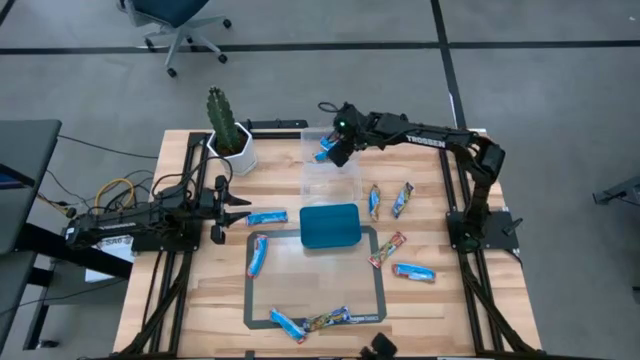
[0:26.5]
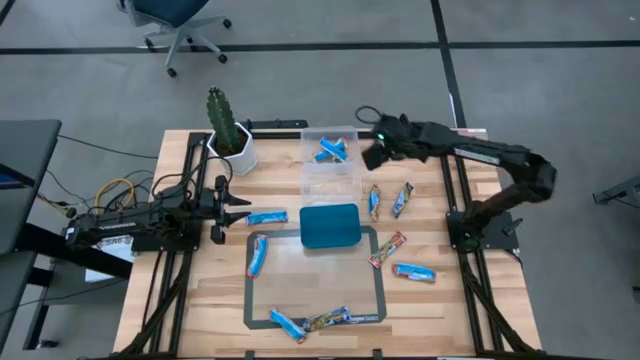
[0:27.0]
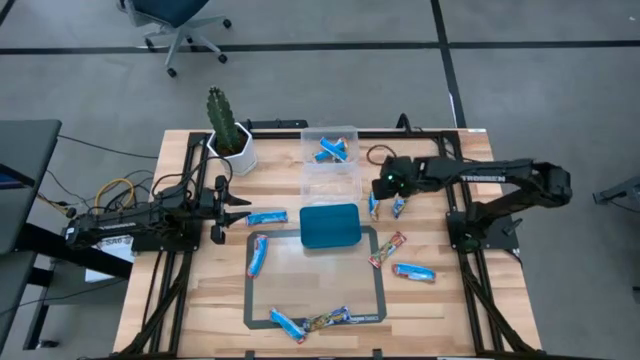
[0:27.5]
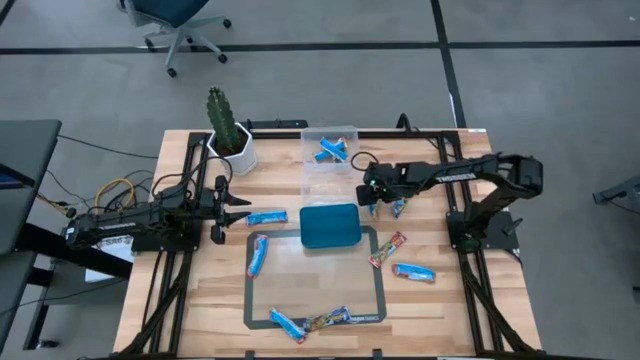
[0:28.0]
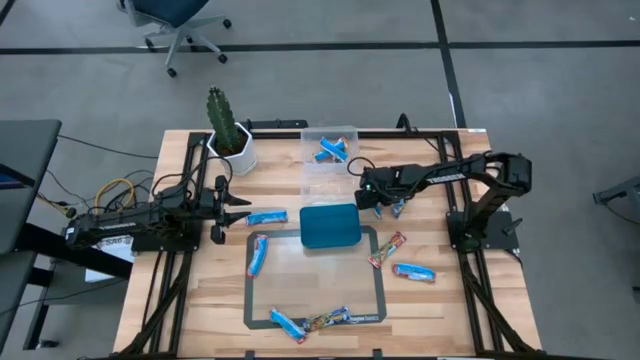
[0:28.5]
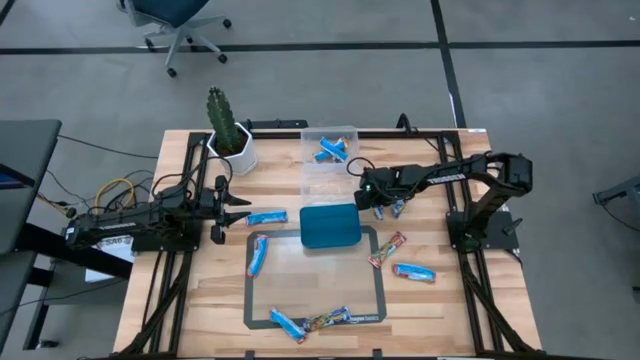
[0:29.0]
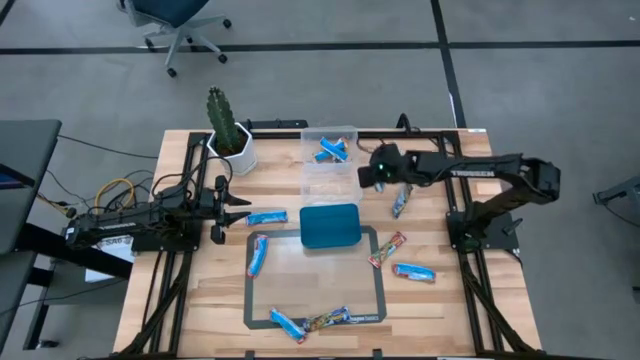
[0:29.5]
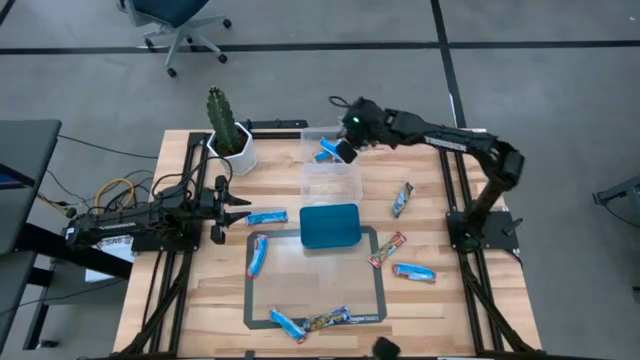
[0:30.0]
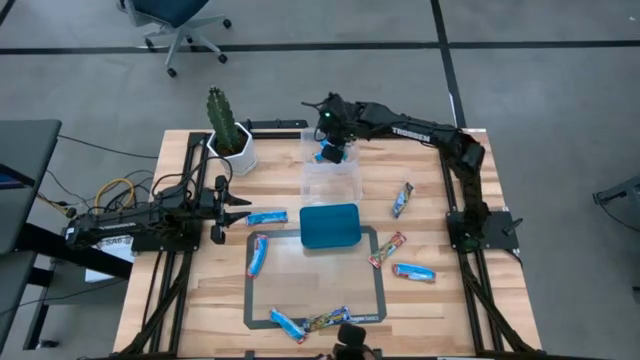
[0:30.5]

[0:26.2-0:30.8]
Task: Pick and place Granola Bars by type
Put the yellow granola bar into the top transparent bin

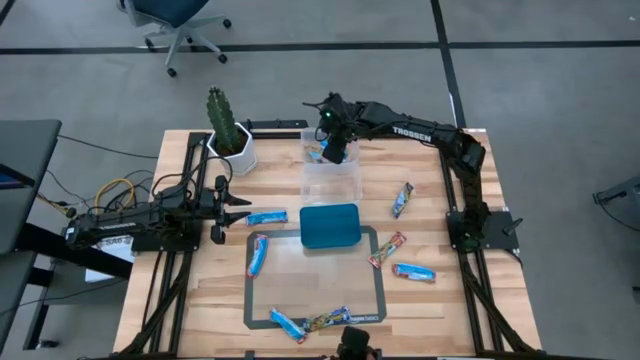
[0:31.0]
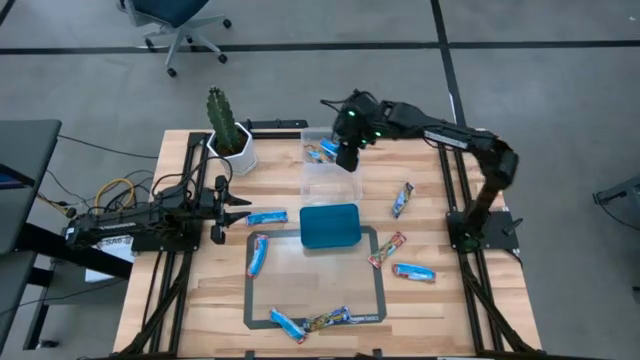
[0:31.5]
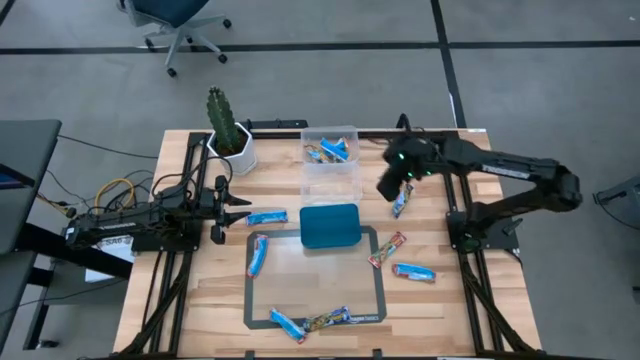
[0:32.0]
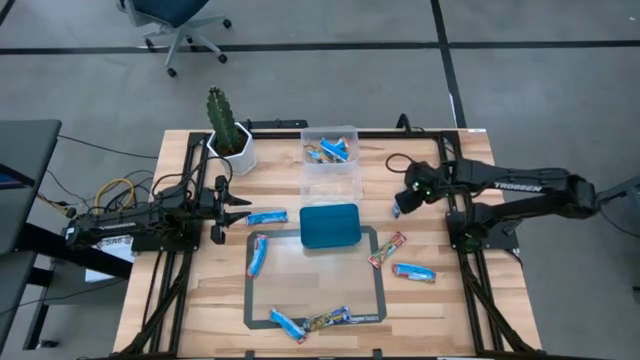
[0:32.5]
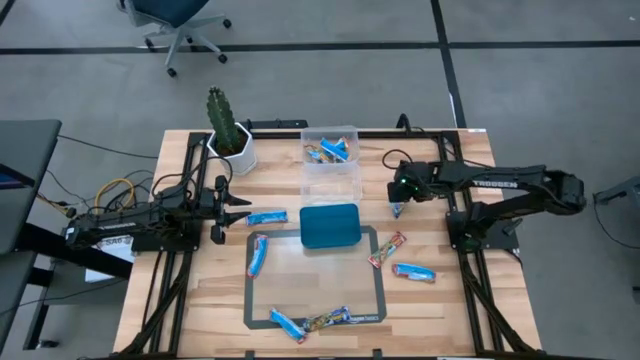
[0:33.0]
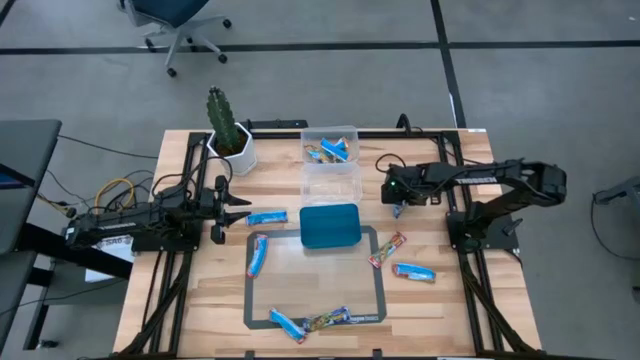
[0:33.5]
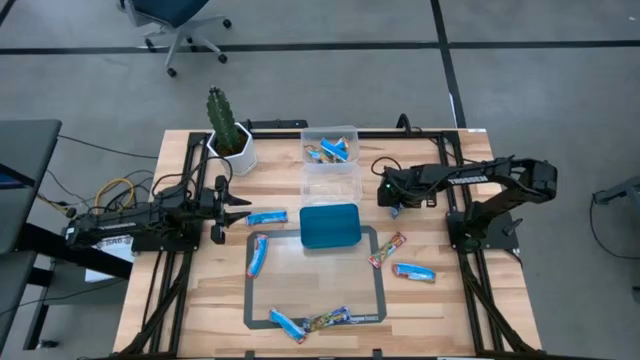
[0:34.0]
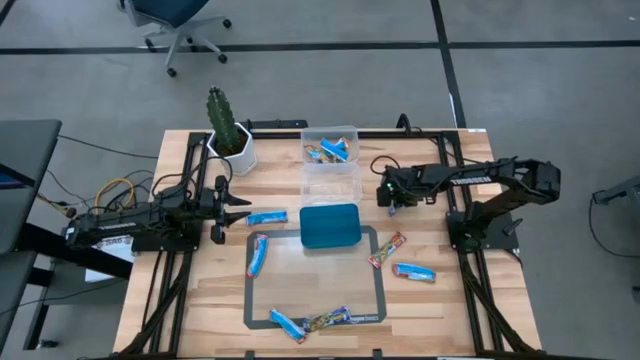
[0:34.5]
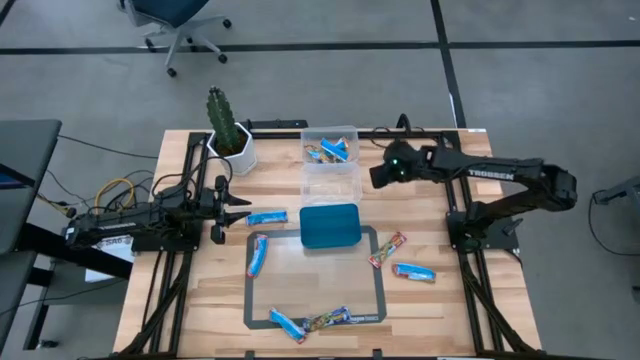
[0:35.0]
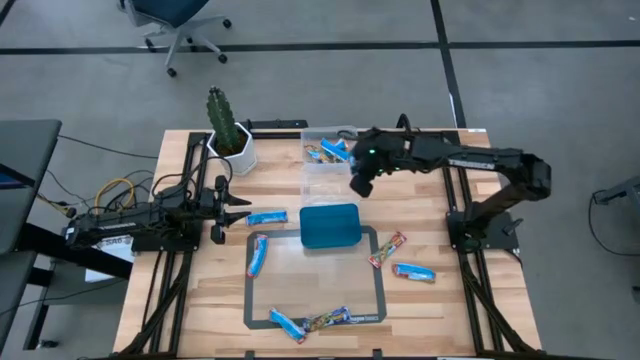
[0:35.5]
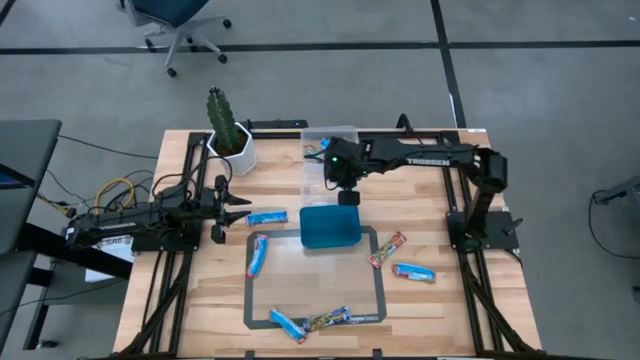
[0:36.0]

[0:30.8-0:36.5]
Put the blue granola bar into the bottom transparent bin

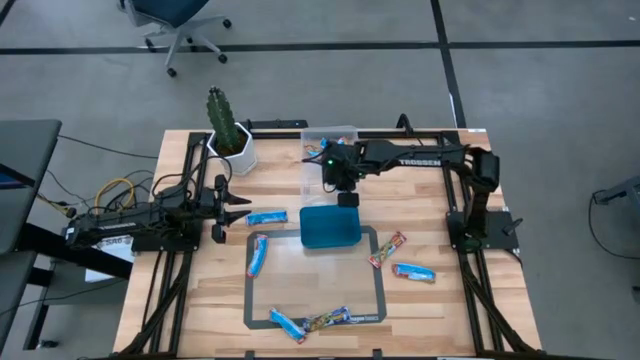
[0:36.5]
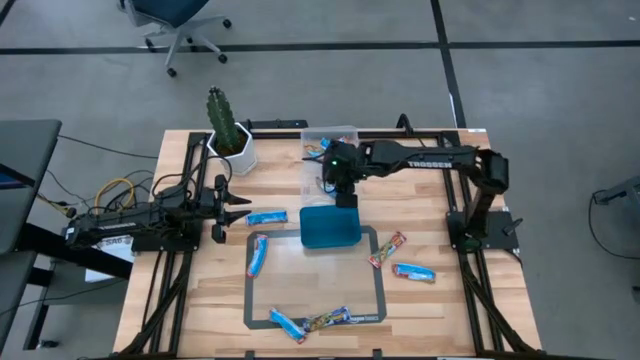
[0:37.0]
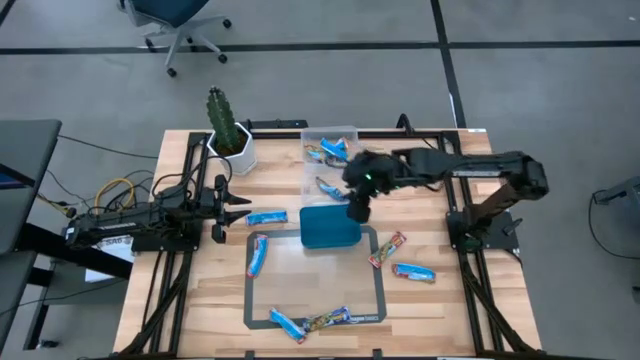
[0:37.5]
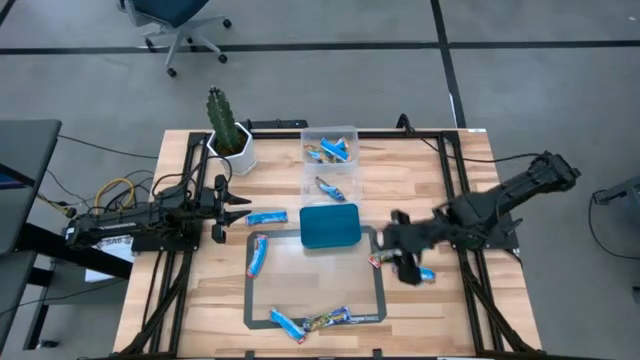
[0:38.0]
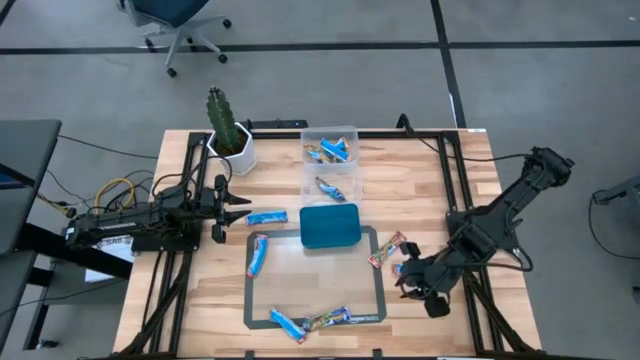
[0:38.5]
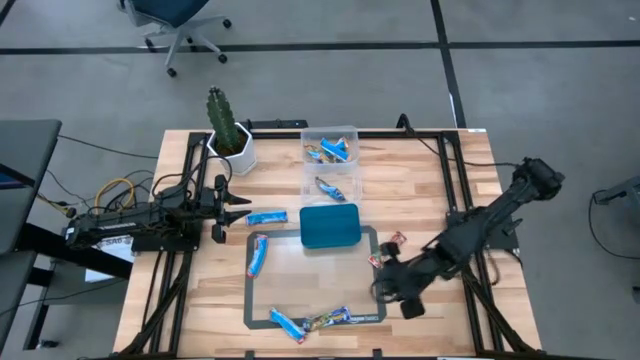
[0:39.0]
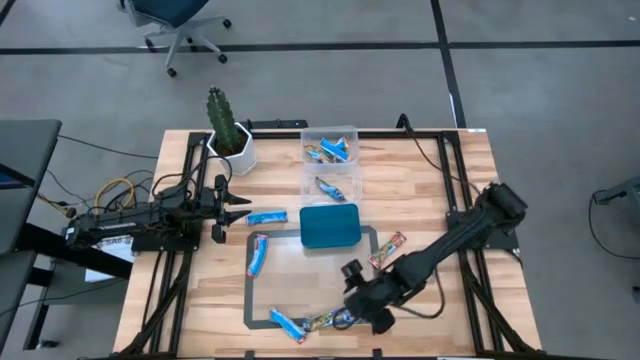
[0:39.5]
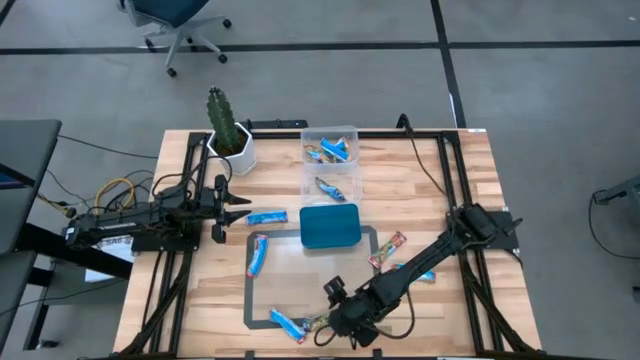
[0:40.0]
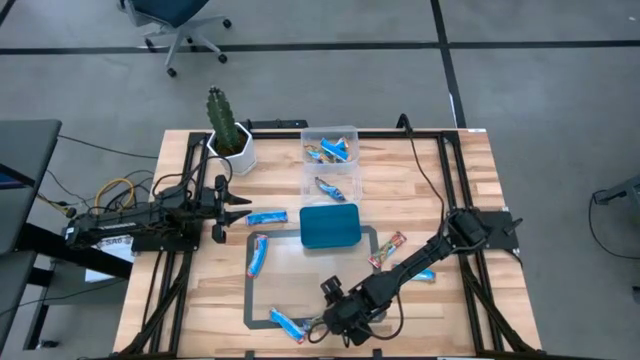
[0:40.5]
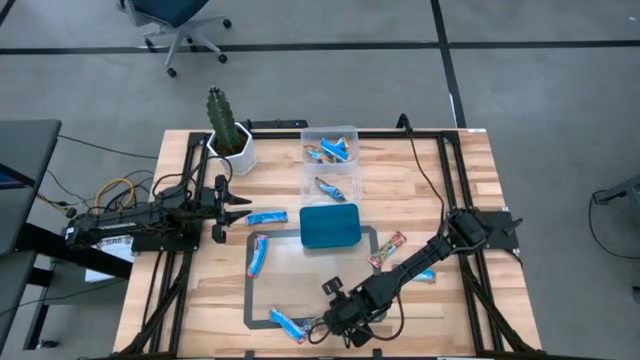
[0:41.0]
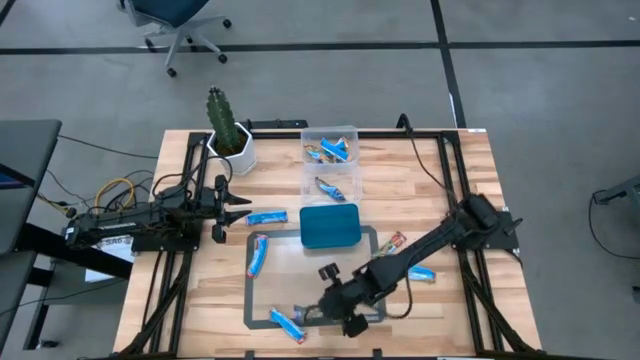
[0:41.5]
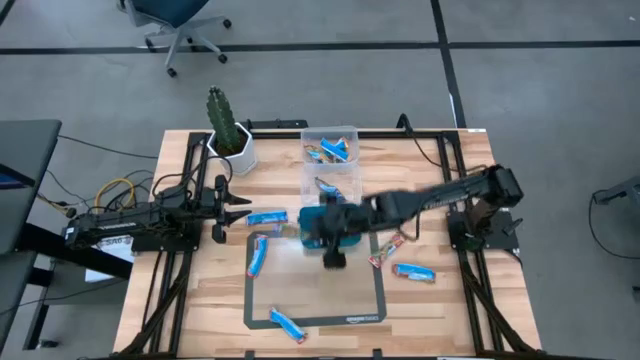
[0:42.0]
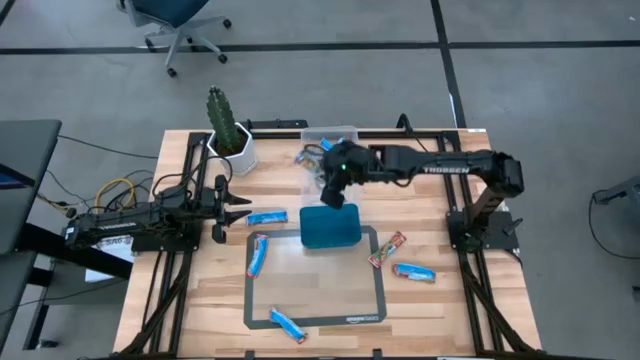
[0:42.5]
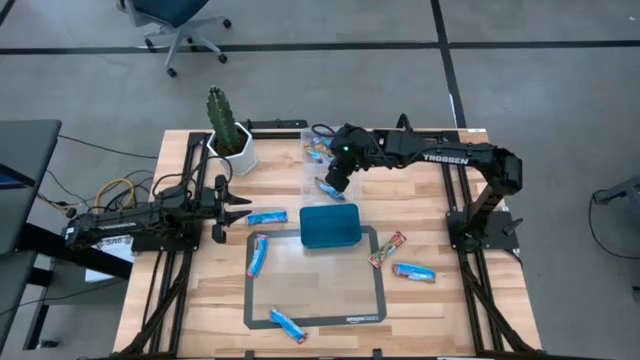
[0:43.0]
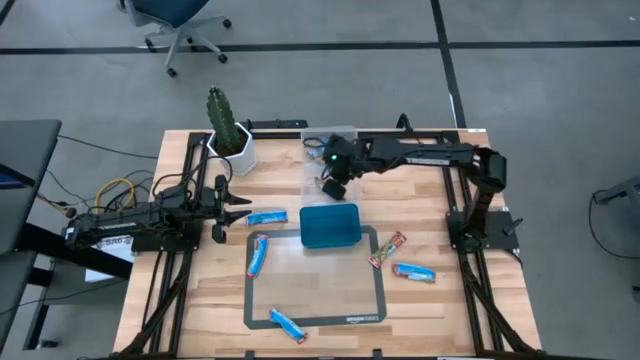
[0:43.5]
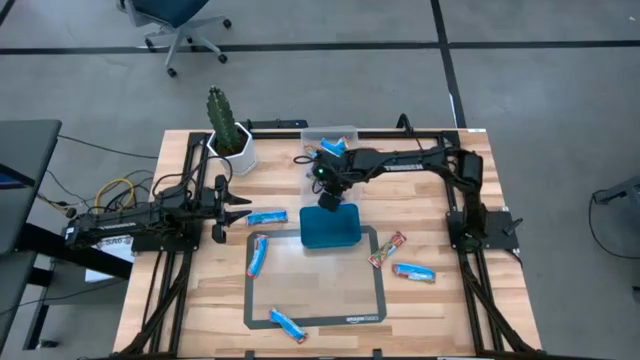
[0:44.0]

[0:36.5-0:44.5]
Put the blue granola bar into the bottom transparent bin

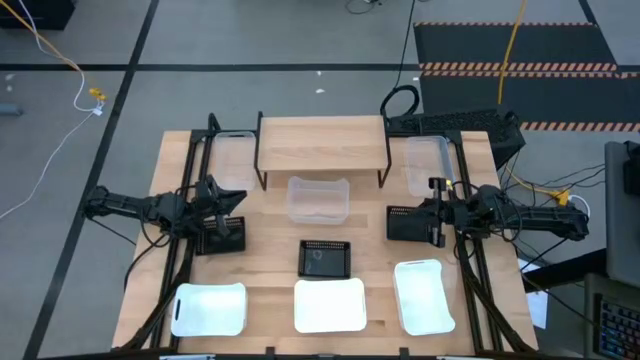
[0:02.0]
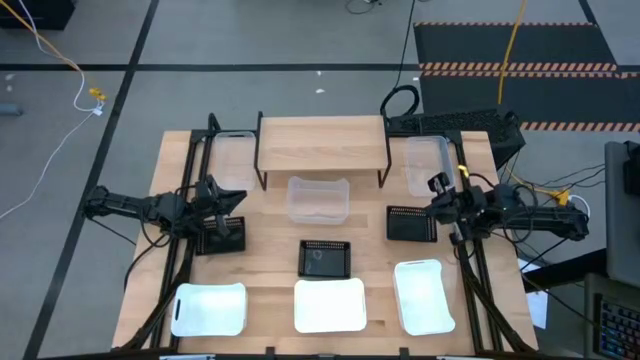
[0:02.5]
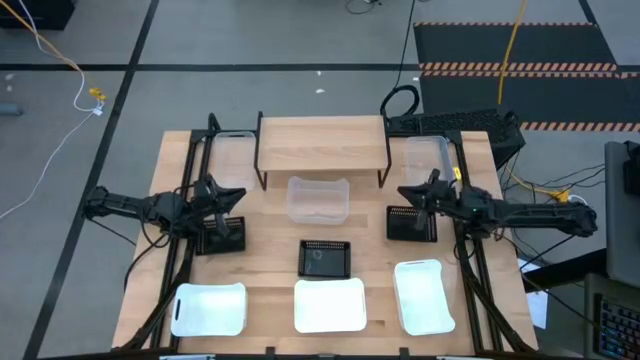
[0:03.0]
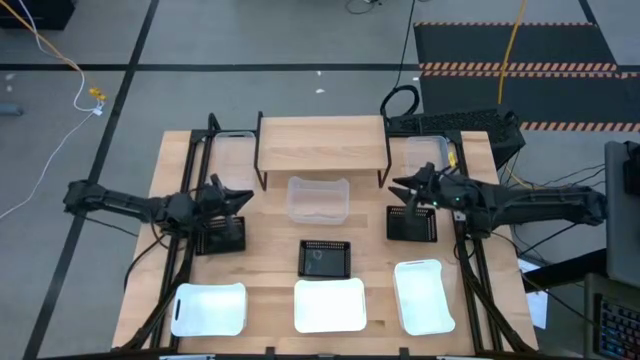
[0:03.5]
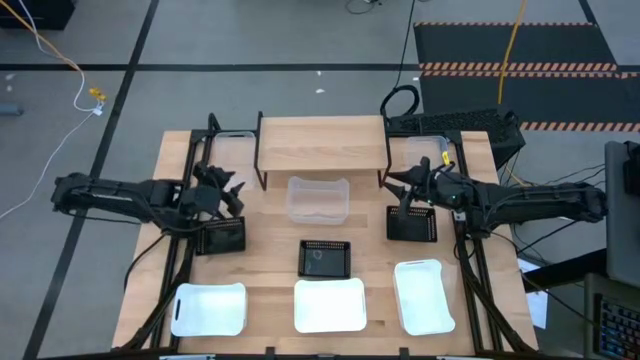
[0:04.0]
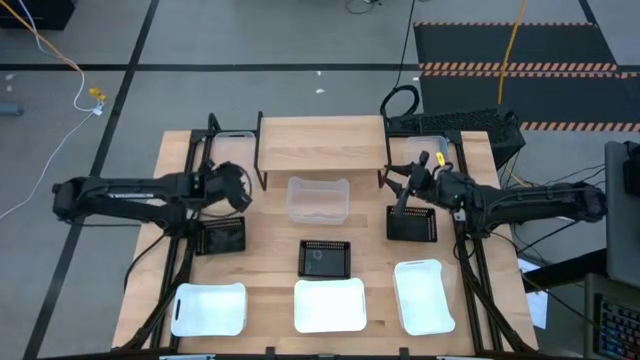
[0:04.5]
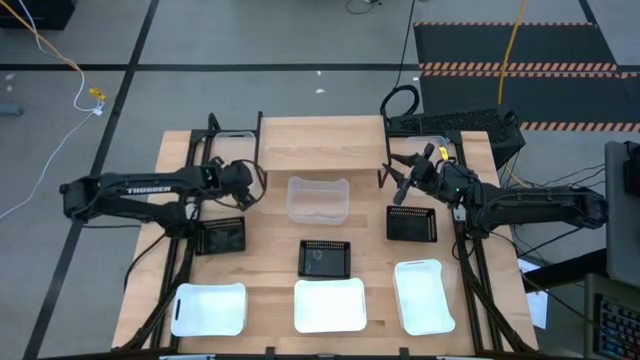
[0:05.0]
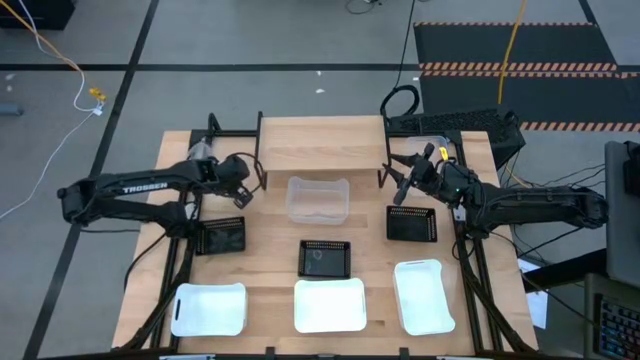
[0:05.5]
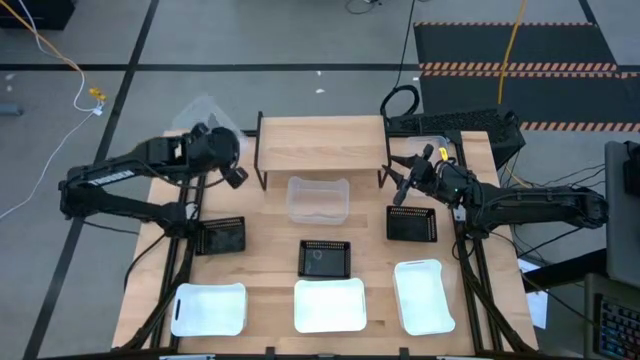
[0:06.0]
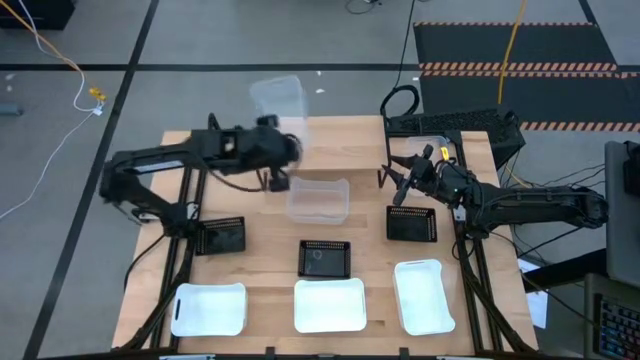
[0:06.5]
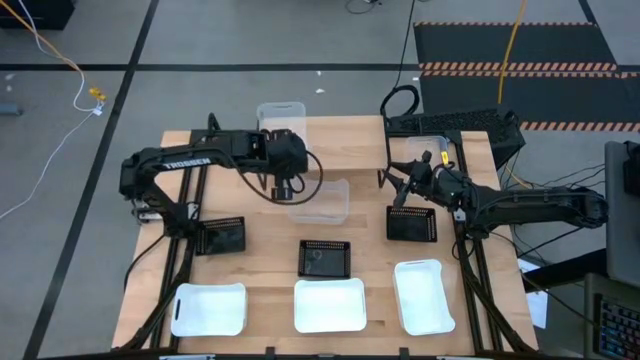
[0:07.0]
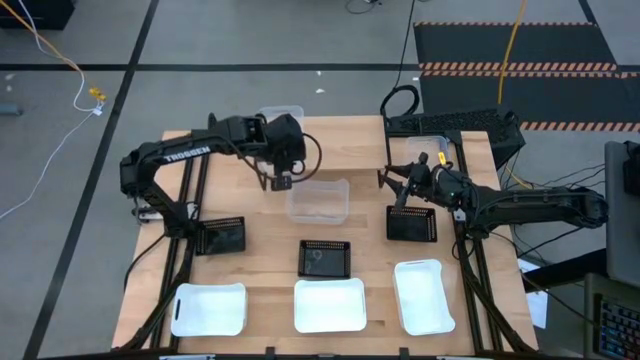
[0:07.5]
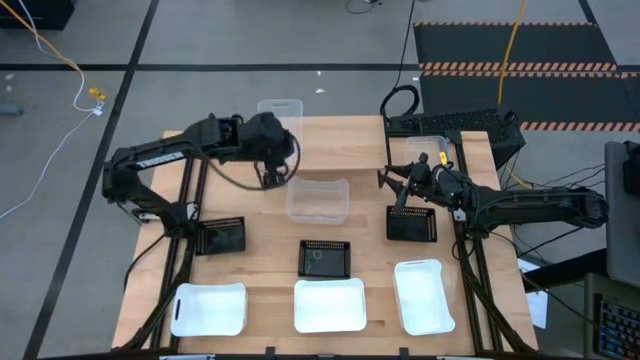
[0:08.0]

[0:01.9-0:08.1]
Task: Stack baskets on shelf by color
Put the left transparent bin on the shelf
